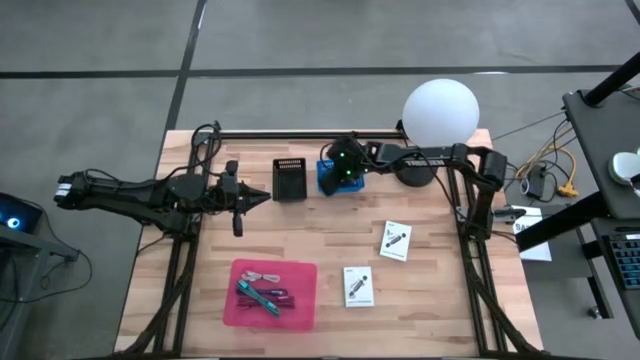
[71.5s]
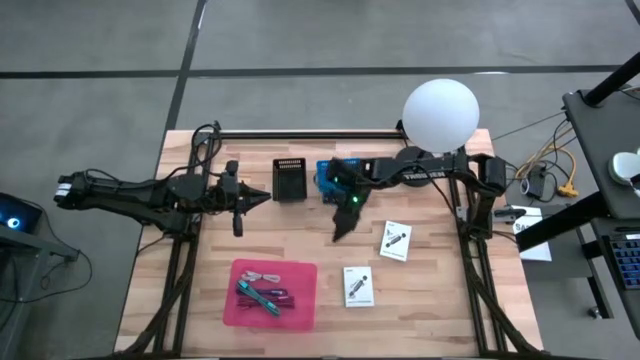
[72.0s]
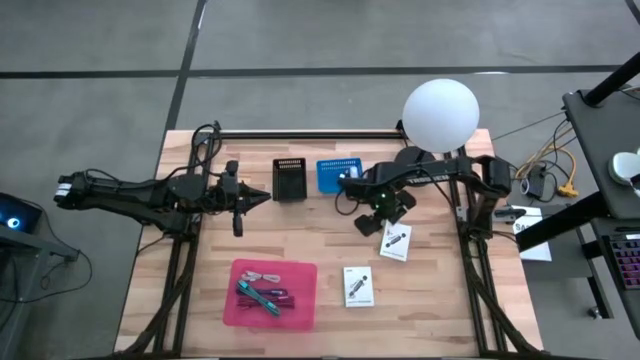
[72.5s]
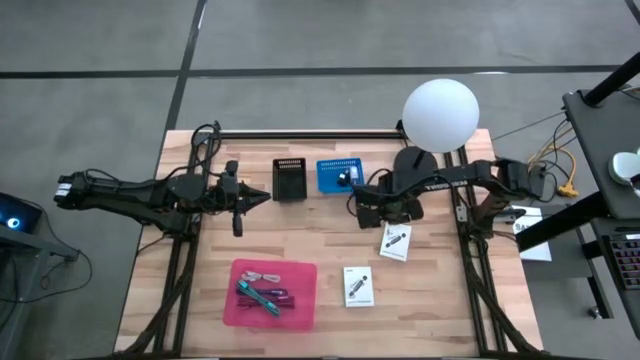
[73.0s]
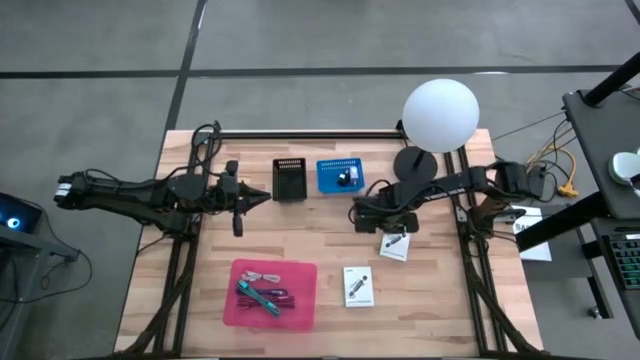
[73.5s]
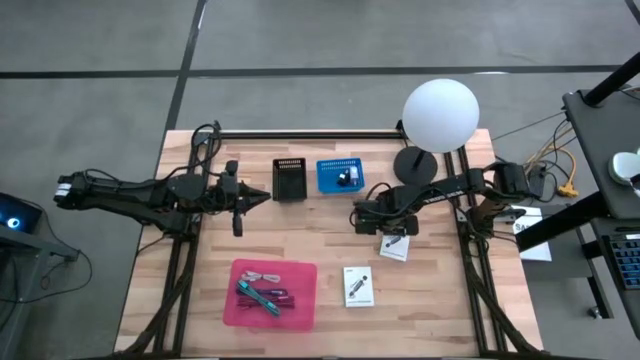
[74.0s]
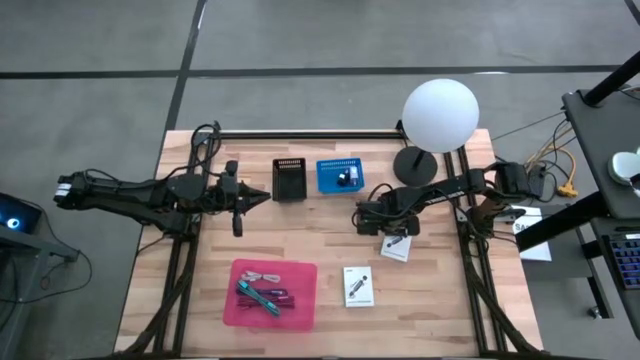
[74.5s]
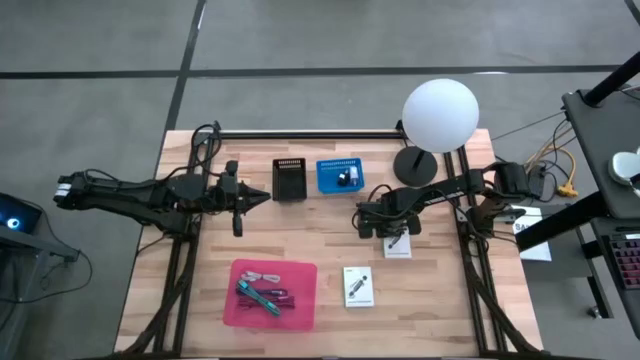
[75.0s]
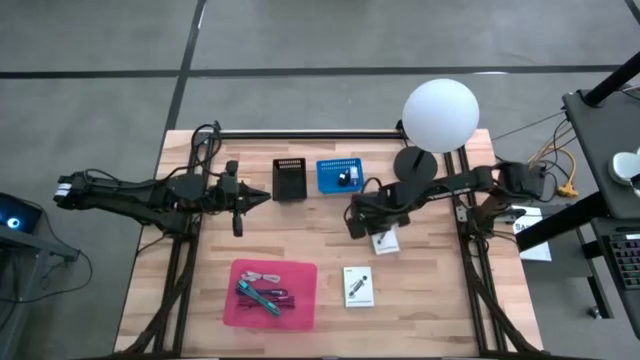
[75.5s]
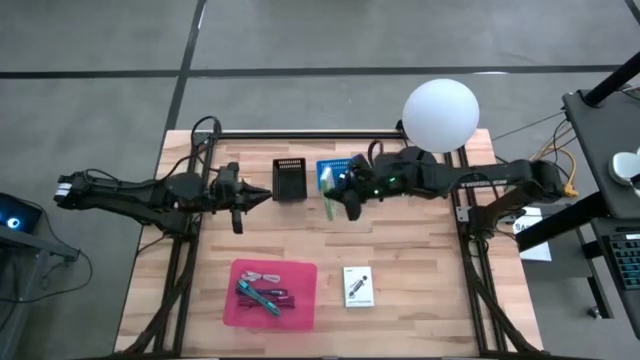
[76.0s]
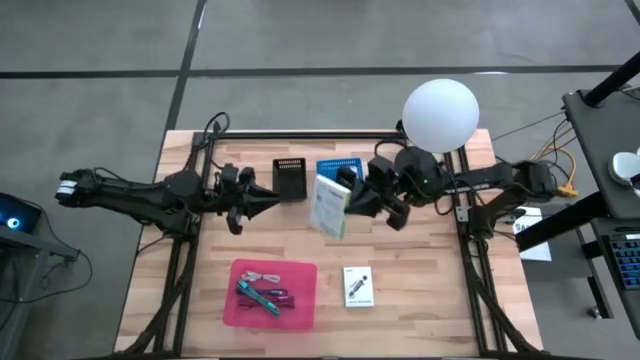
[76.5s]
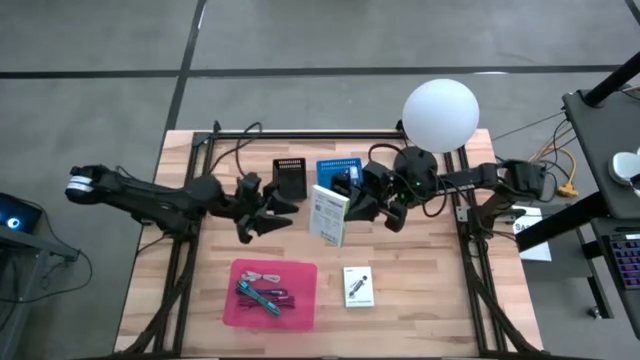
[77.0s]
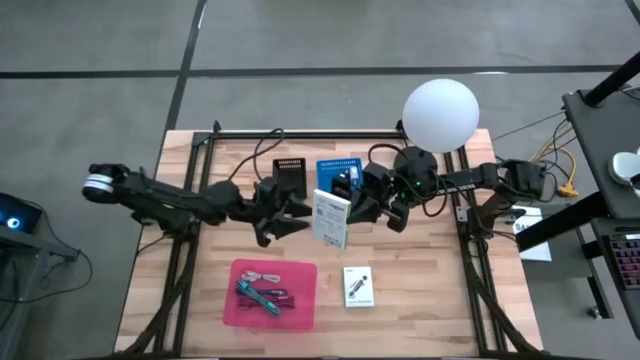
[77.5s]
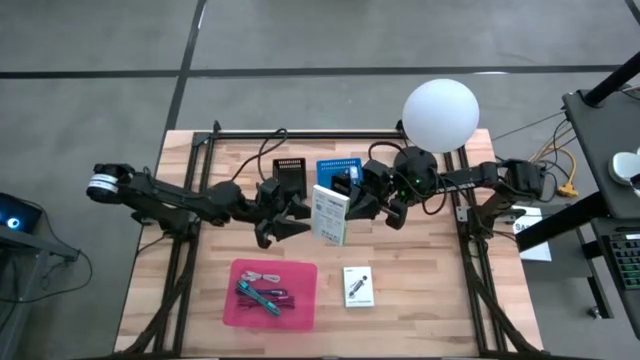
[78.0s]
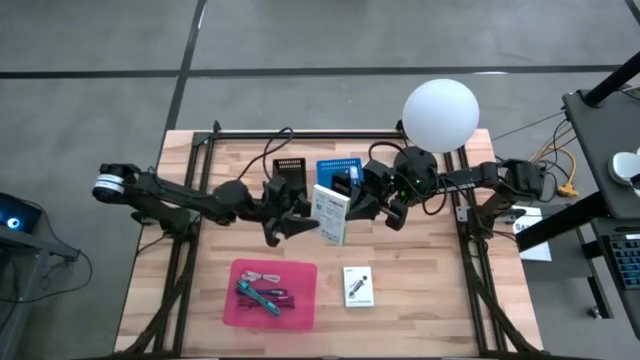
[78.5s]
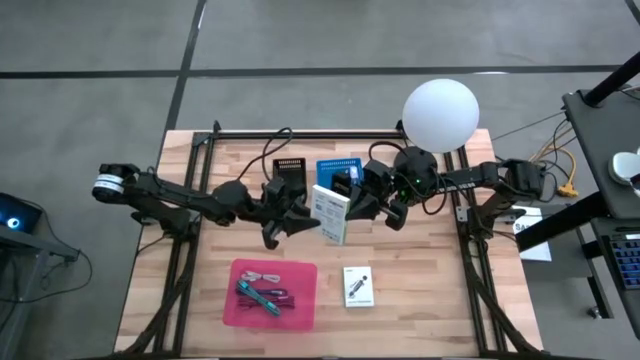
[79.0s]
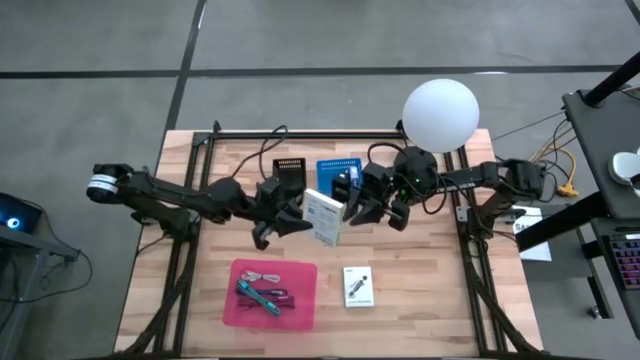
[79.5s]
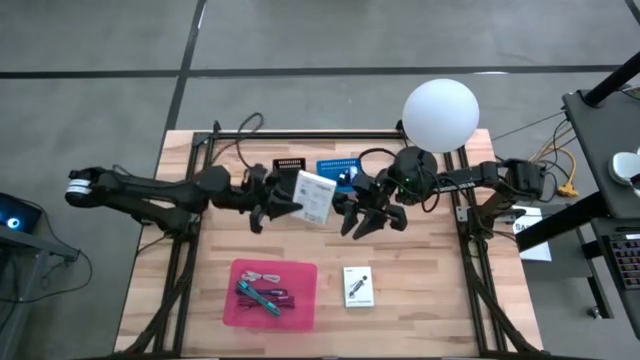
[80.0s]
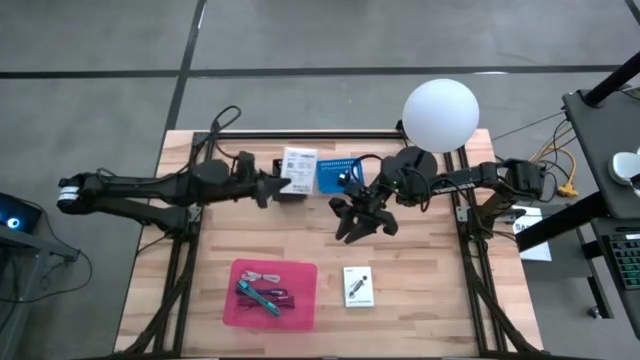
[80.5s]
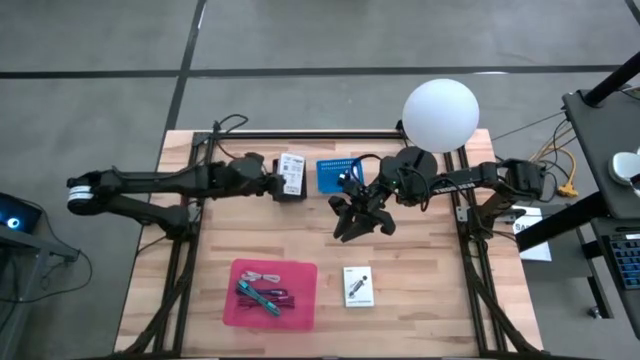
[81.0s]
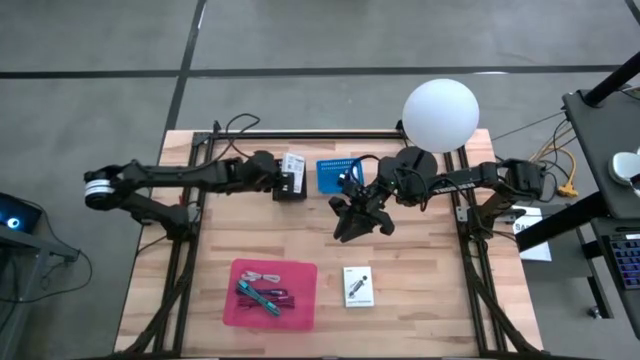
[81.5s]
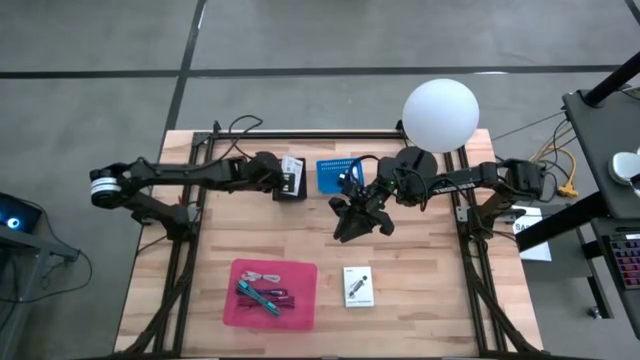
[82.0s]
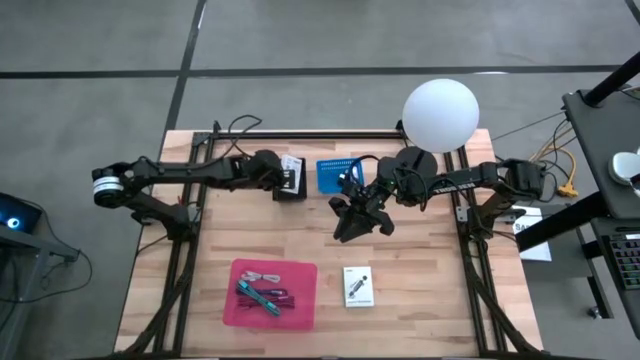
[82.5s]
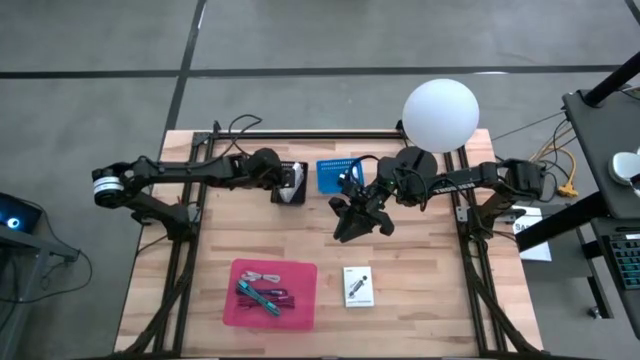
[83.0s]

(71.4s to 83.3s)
Task: Pick and place items into bin
Put the top white card reader box into the black basket

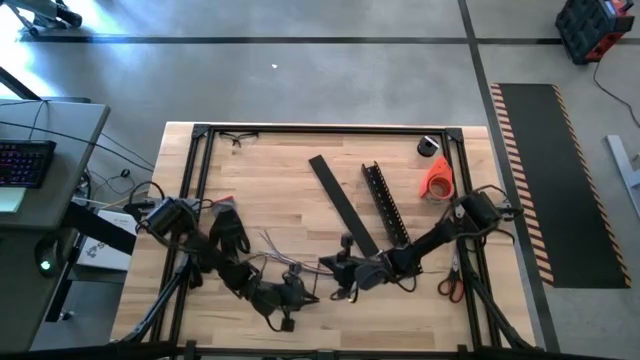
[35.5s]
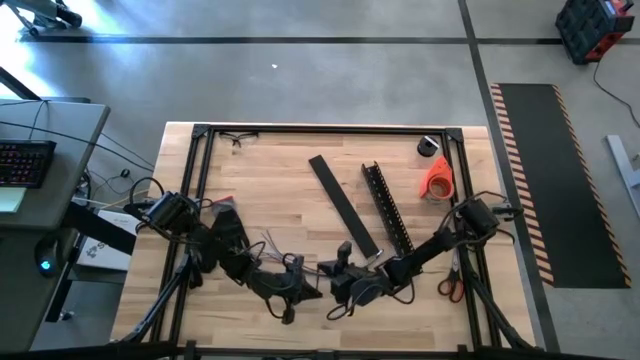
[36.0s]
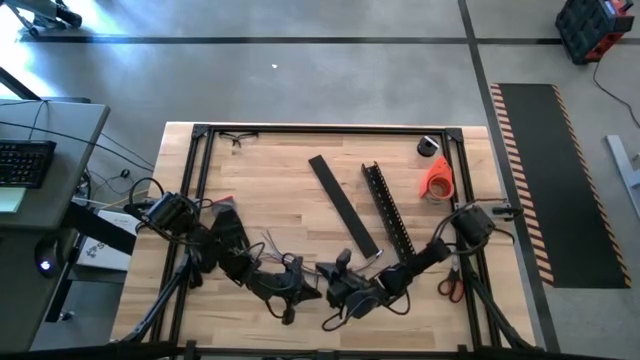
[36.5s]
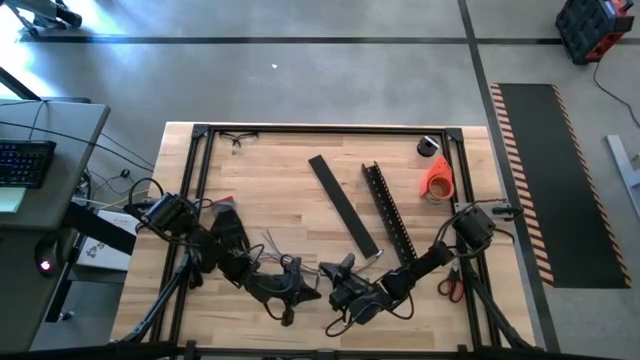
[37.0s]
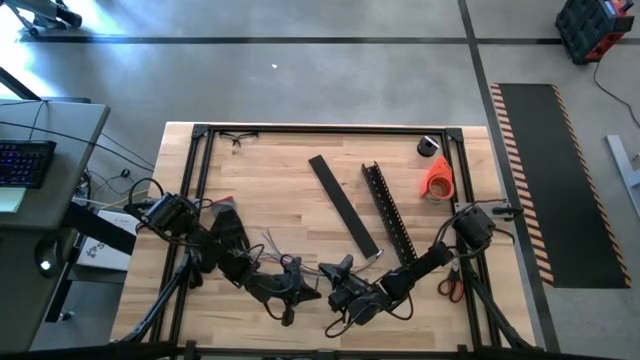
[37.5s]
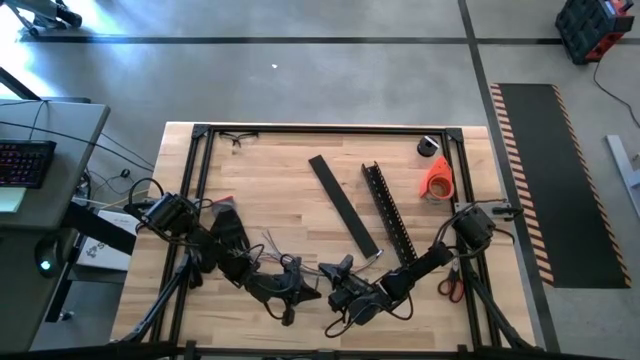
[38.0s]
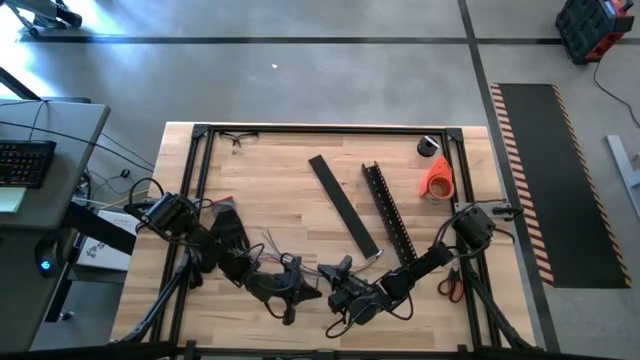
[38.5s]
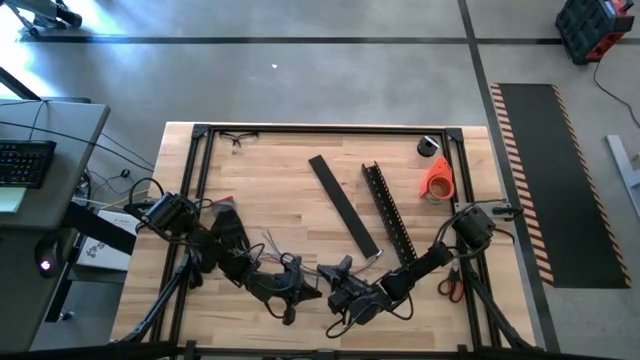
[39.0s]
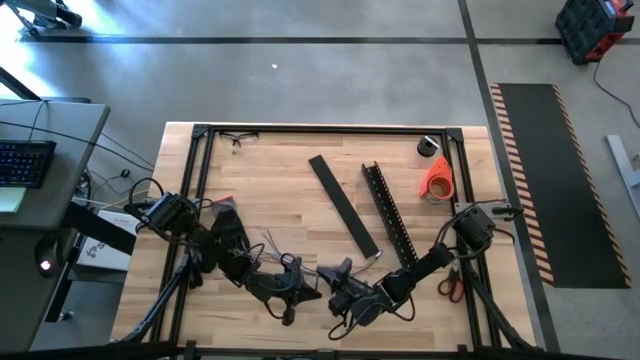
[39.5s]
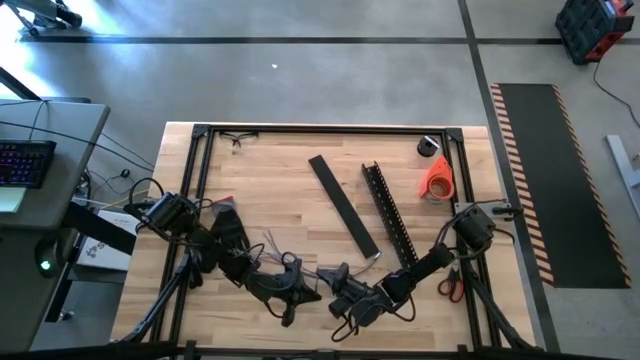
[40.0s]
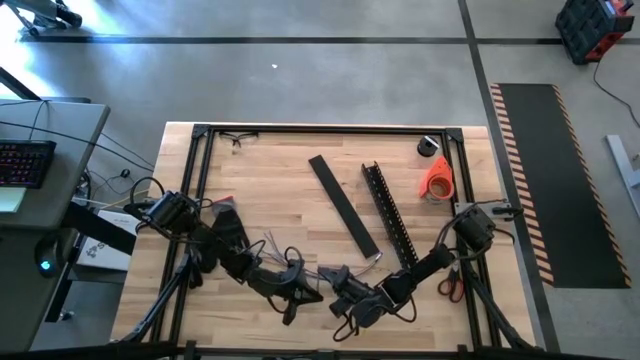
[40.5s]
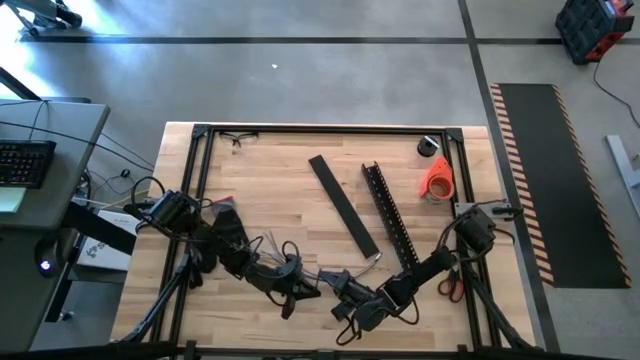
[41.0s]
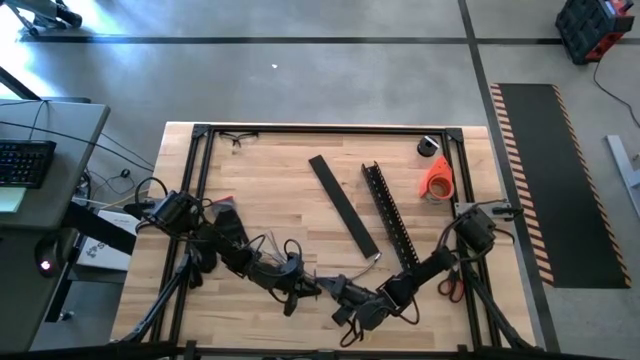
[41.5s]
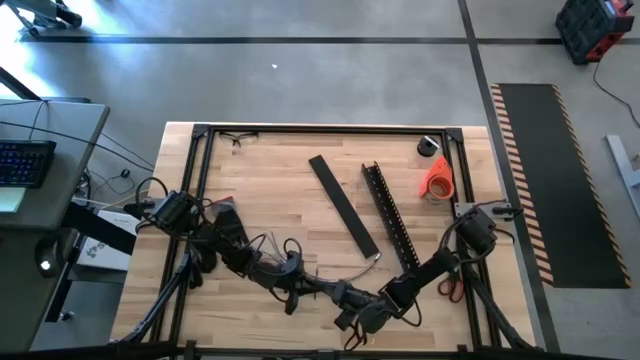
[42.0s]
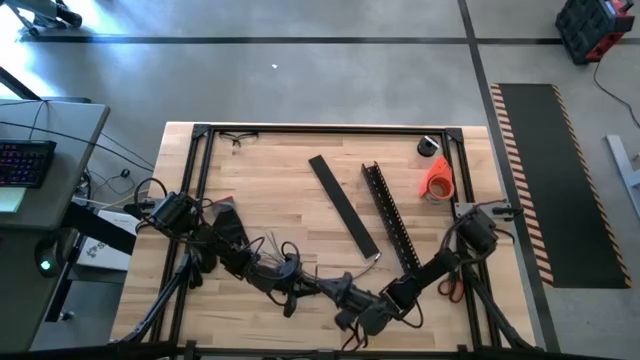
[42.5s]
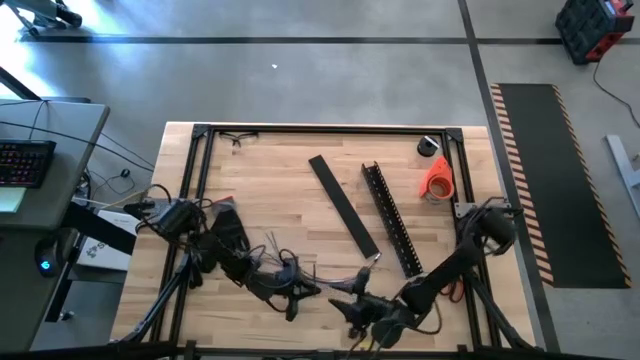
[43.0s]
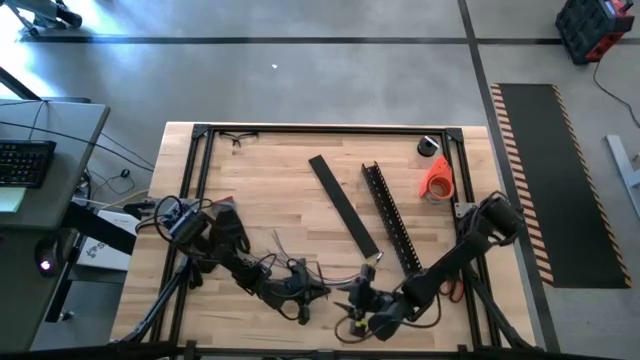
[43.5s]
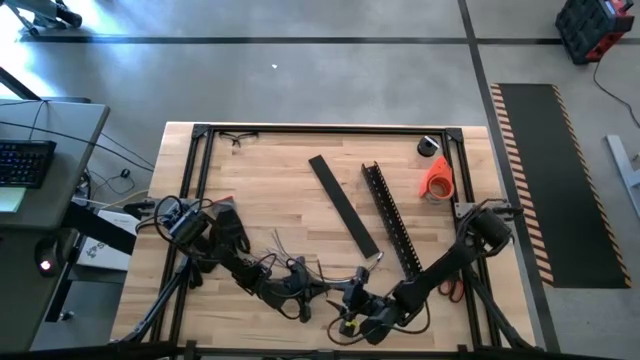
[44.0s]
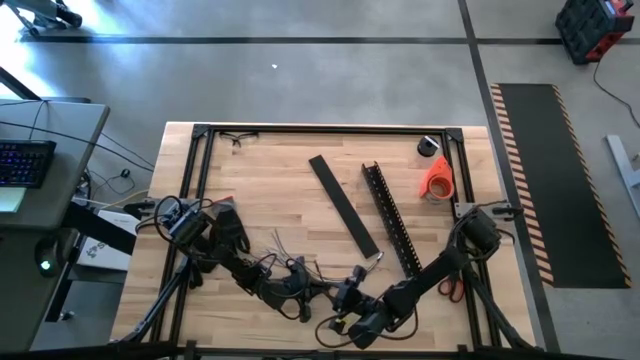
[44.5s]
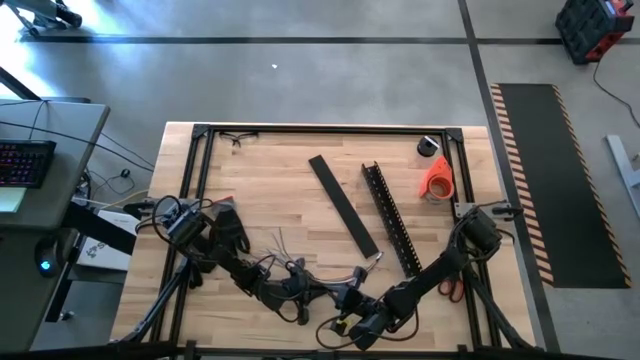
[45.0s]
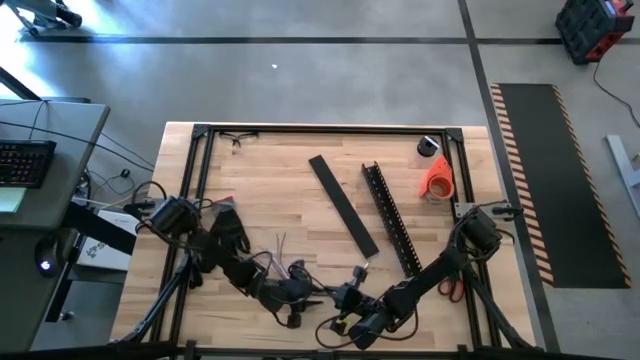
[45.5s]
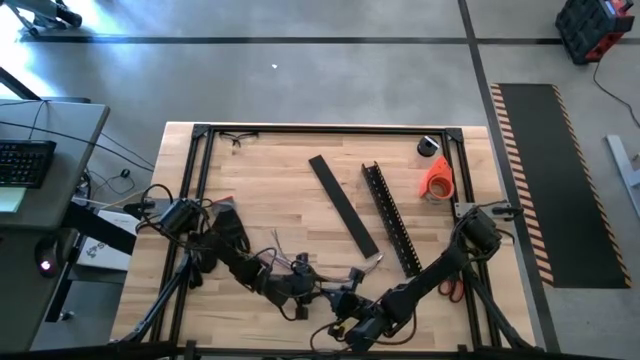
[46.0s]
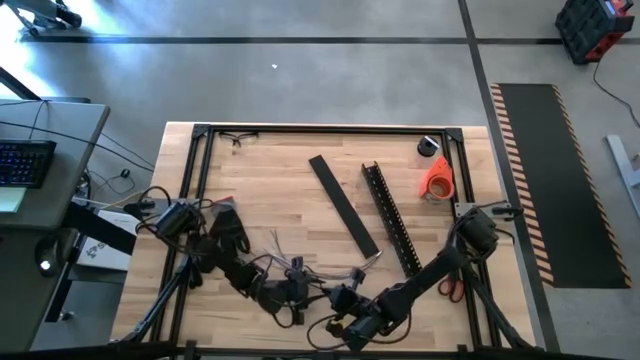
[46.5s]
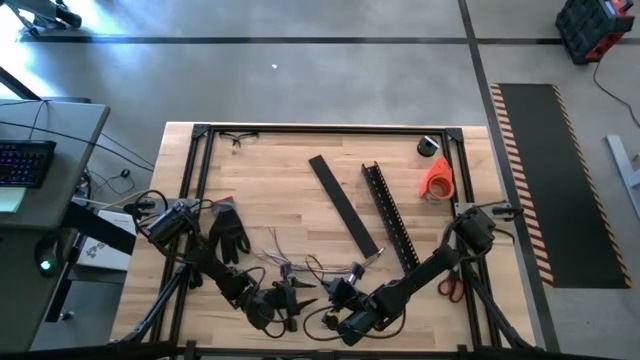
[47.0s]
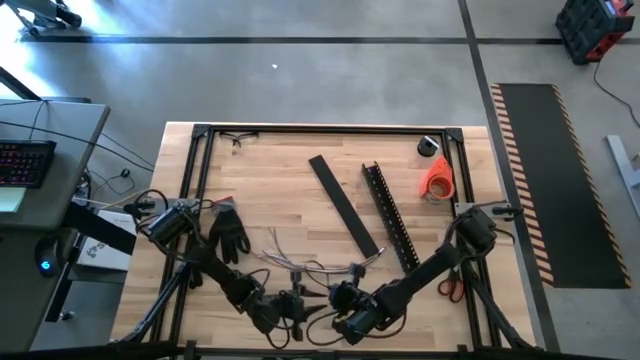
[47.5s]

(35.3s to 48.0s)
Task: Ziptie cables
Wrap the black zip tie on the cables
